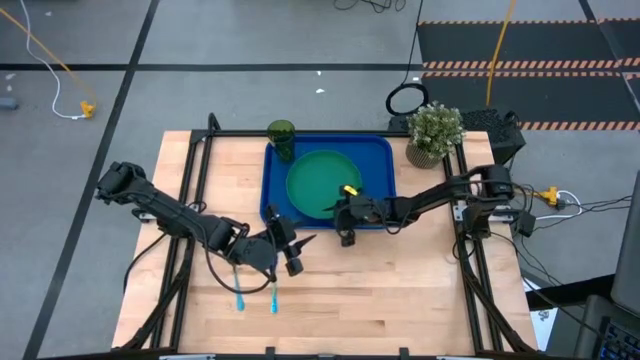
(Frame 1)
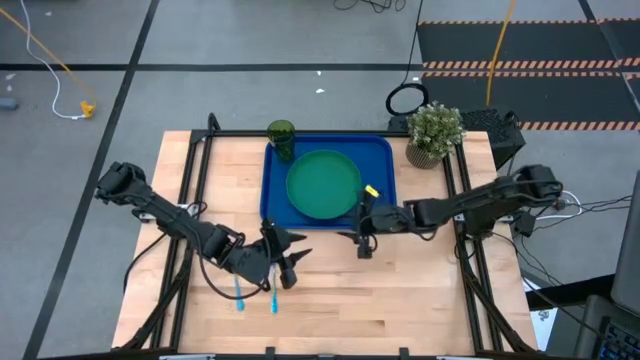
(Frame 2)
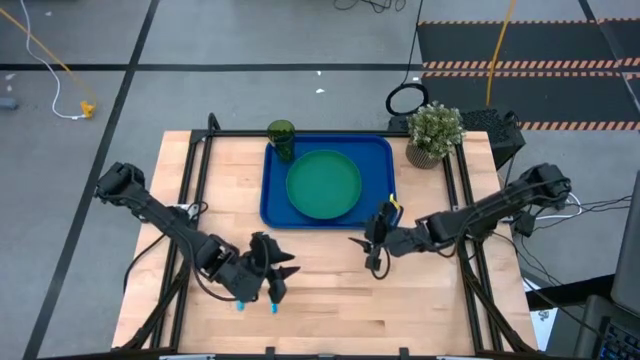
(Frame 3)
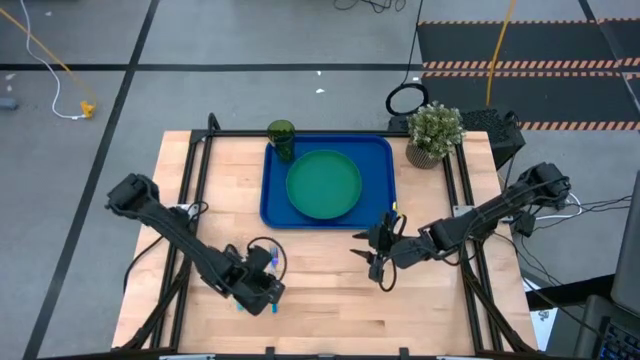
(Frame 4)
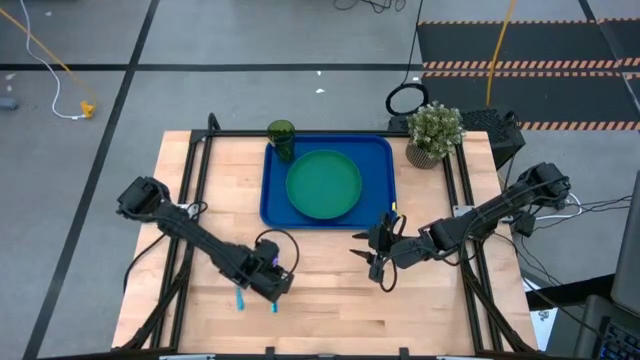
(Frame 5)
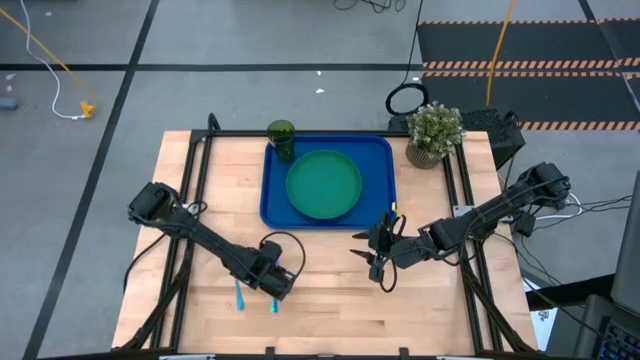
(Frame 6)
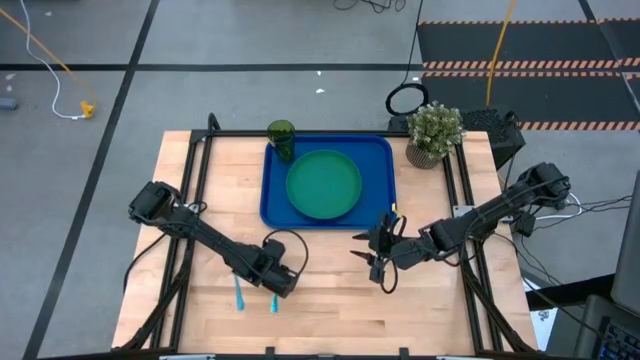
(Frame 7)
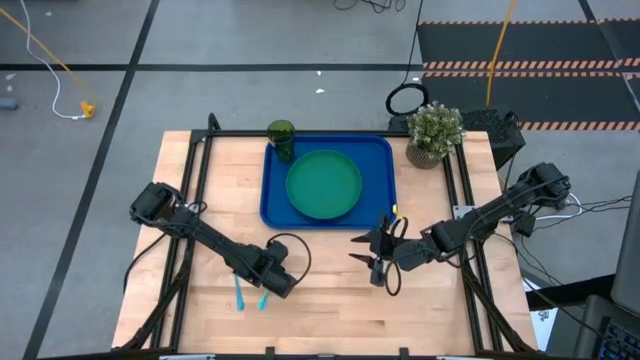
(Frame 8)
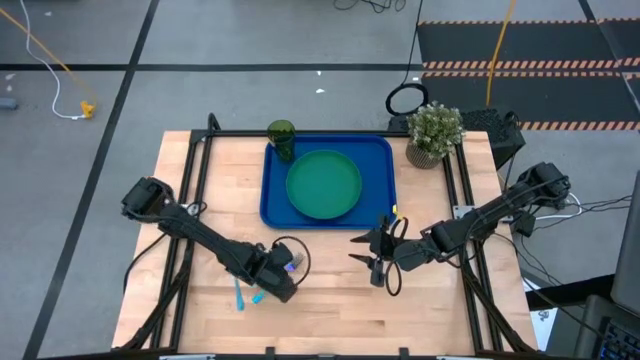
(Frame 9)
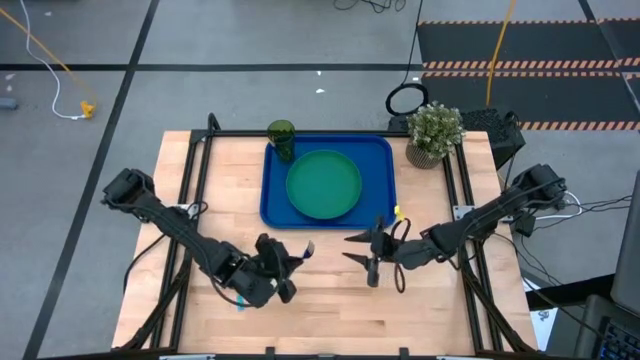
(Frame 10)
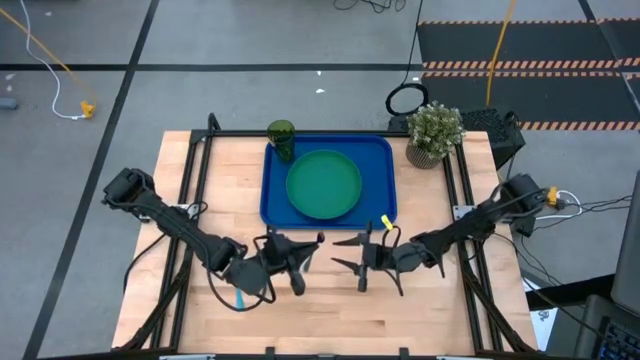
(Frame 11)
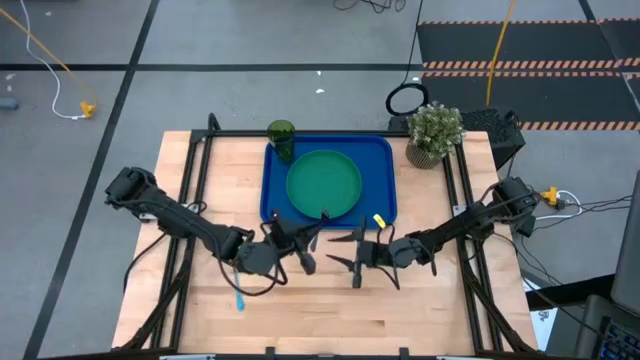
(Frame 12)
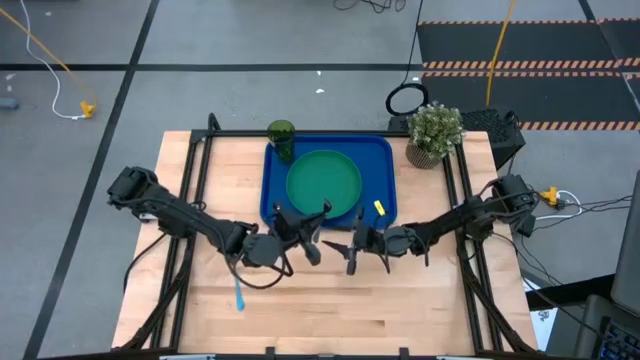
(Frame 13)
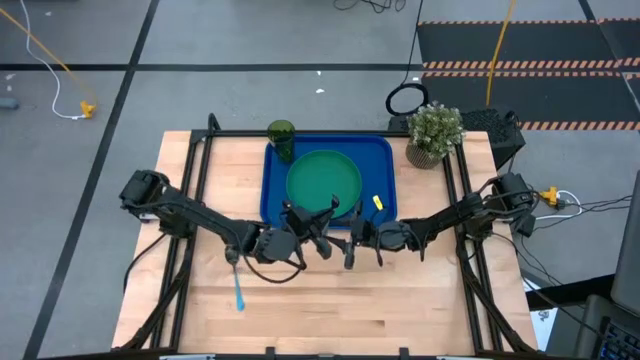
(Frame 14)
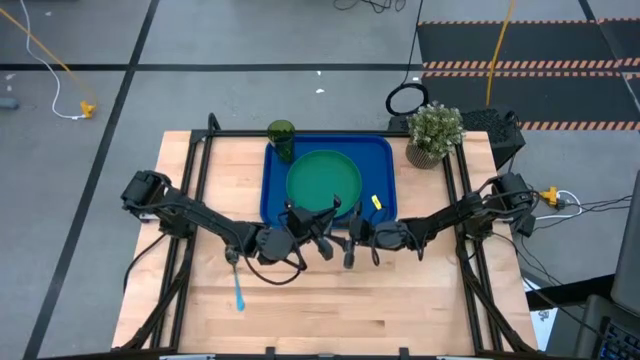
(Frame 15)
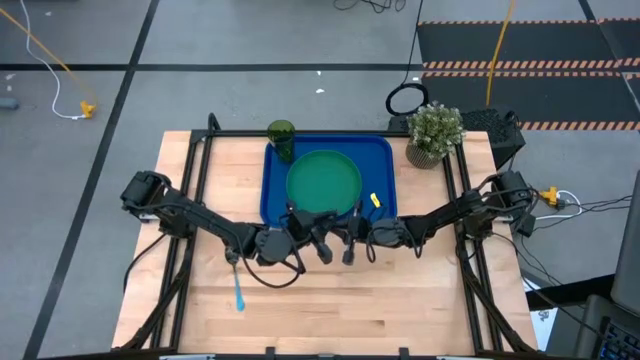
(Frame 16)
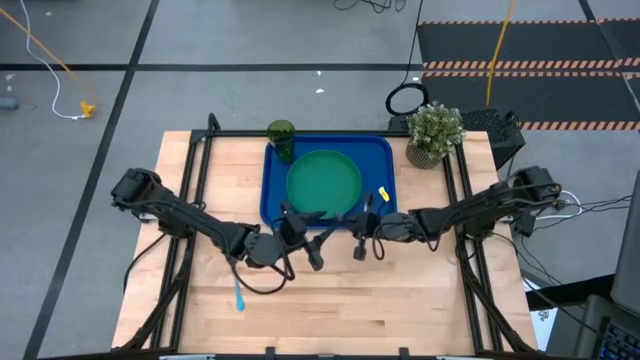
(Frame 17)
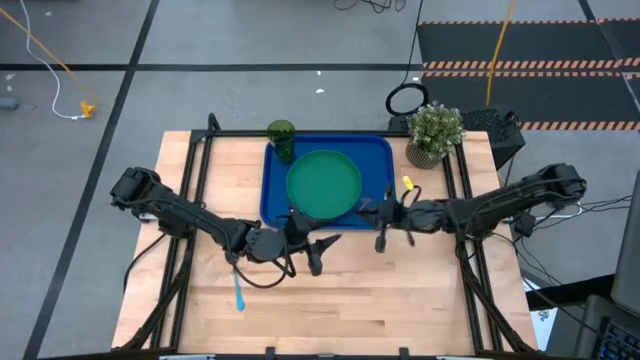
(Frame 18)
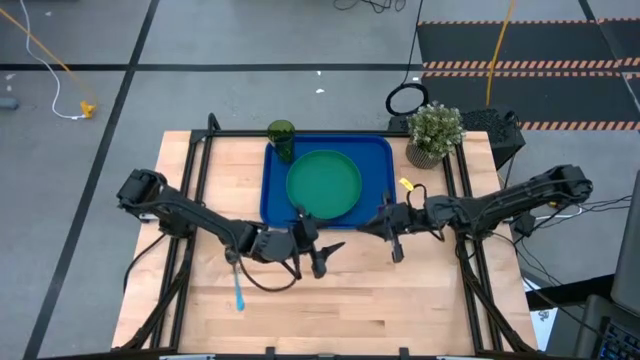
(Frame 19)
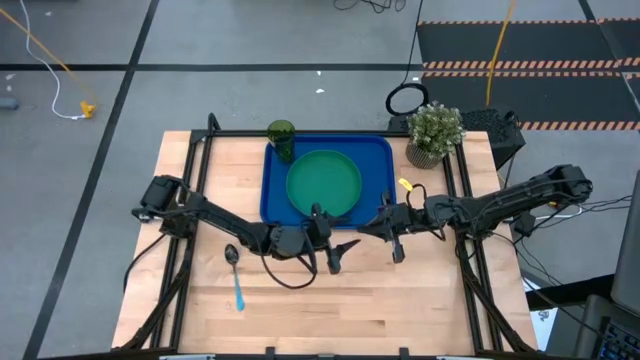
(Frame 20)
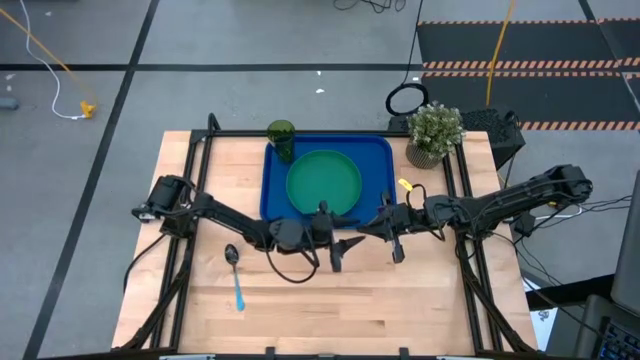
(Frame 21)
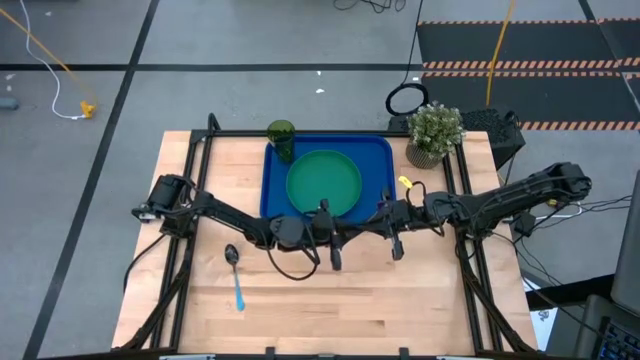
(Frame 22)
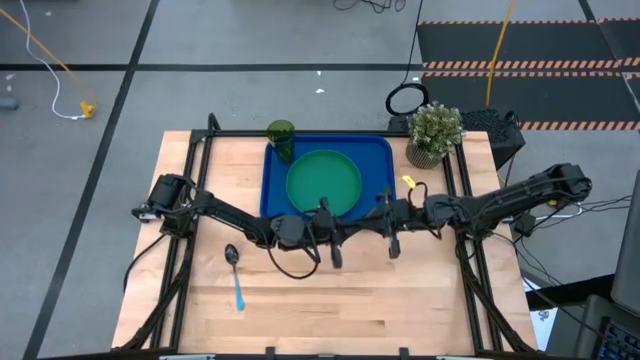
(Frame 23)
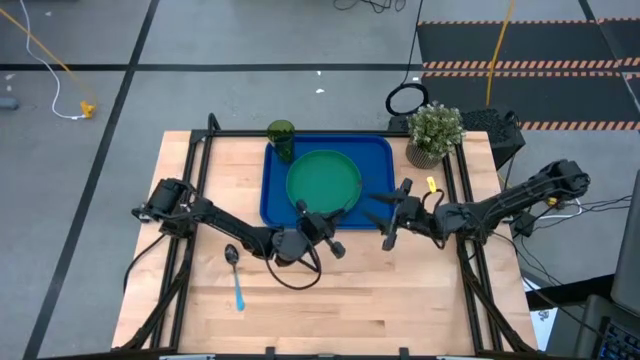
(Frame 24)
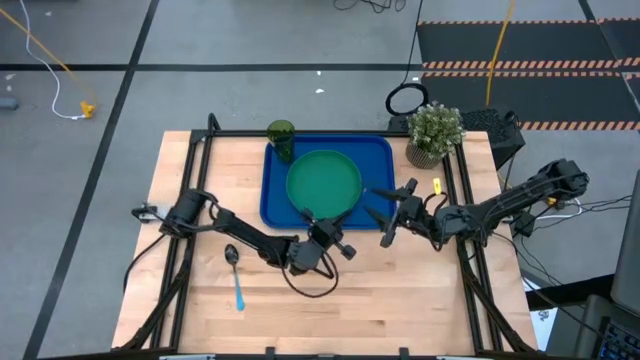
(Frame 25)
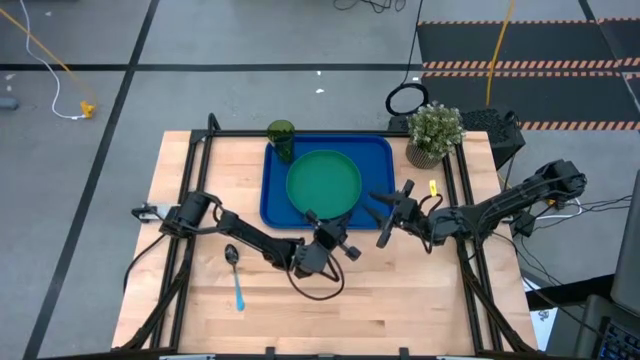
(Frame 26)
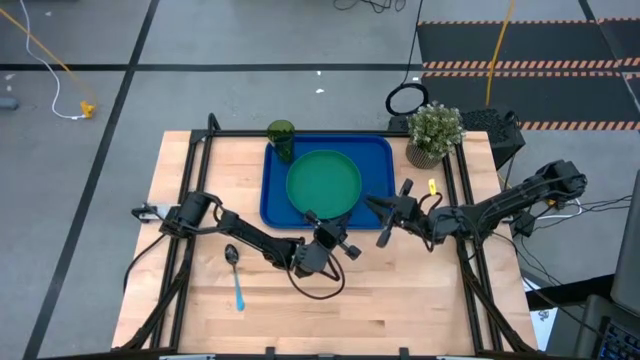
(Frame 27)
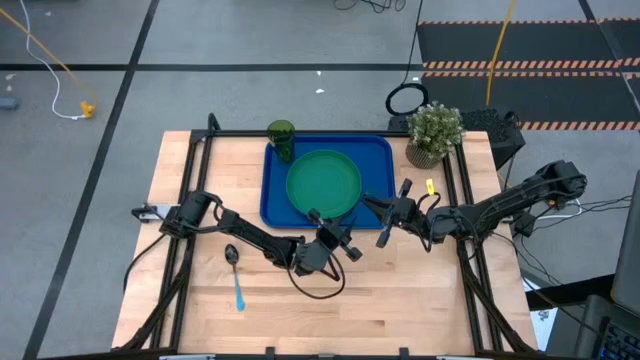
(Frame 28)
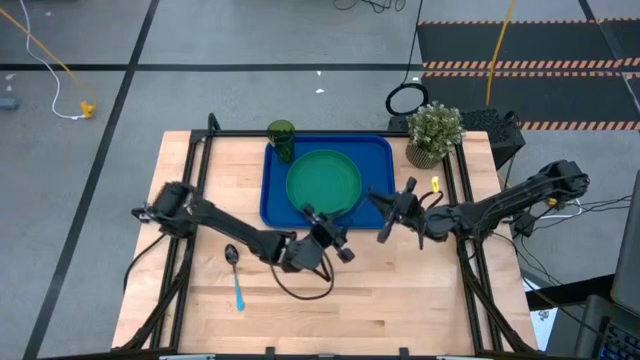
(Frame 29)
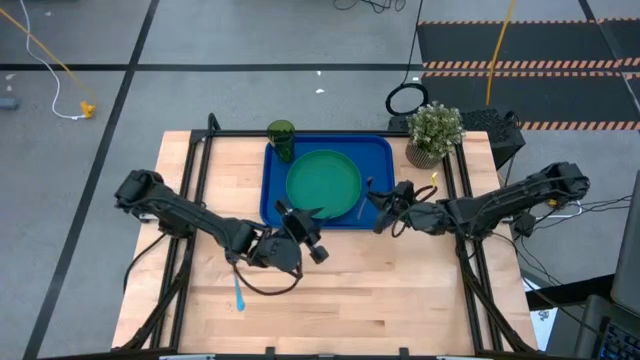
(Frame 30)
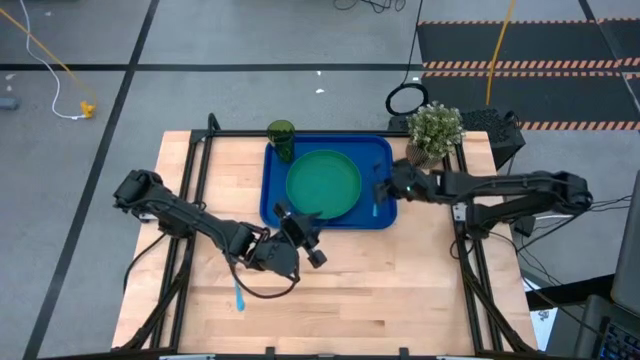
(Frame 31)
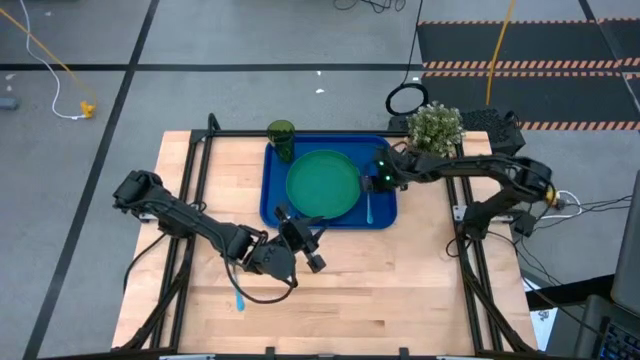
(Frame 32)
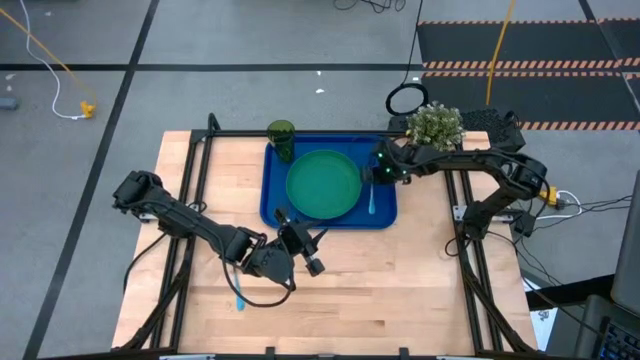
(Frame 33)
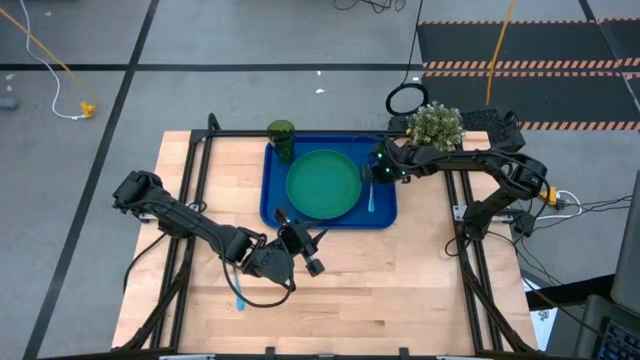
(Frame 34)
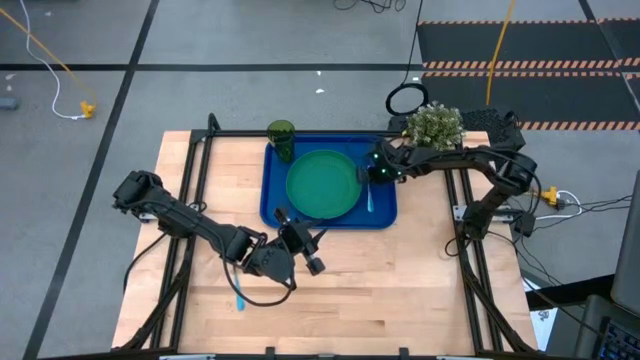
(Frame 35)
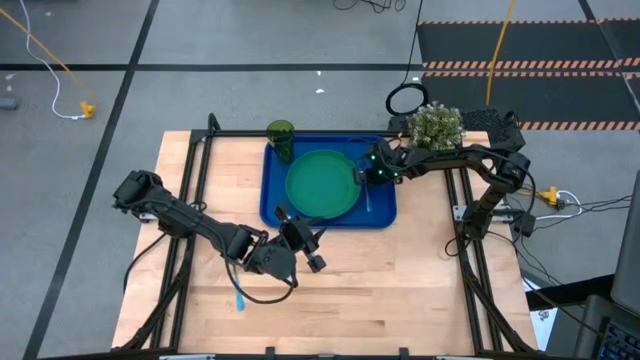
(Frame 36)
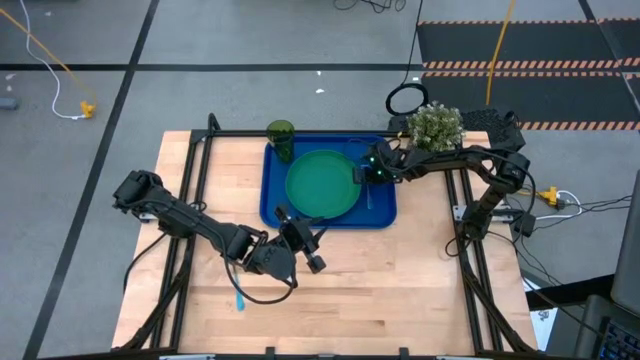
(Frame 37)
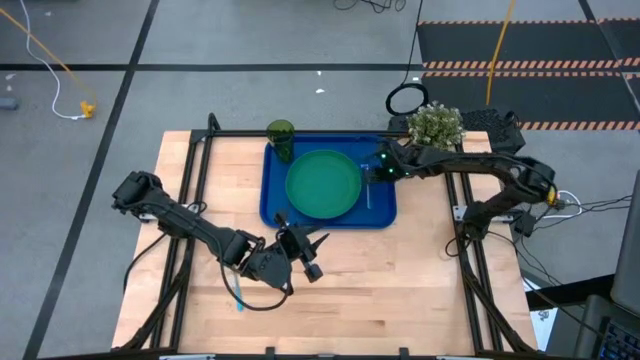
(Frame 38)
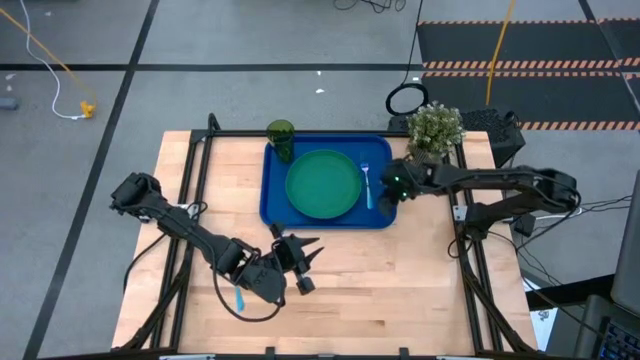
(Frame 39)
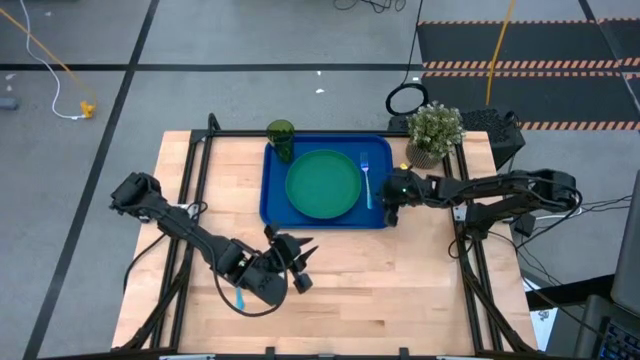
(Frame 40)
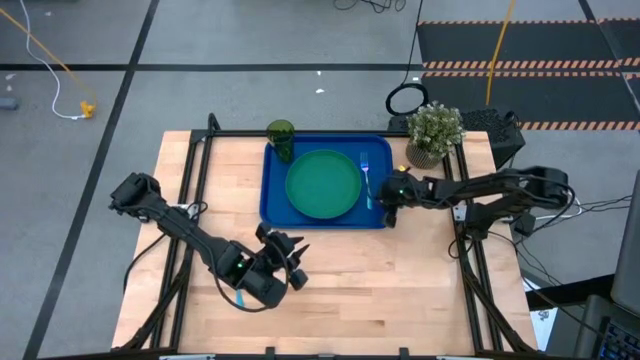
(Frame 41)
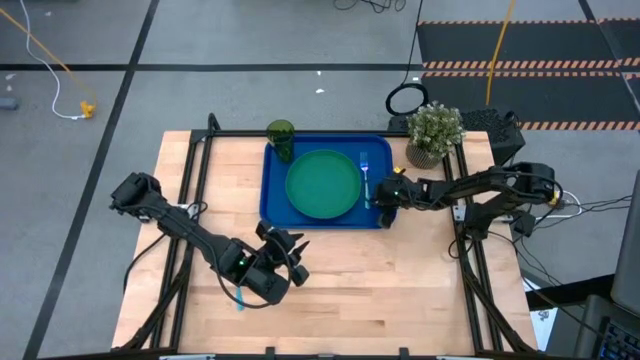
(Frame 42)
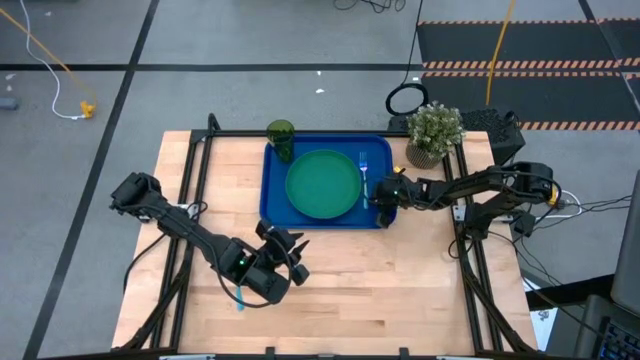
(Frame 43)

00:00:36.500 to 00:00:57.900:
Task: Pick and place plate/cup/fork/spoon on tray
Put the fork beside the green plate

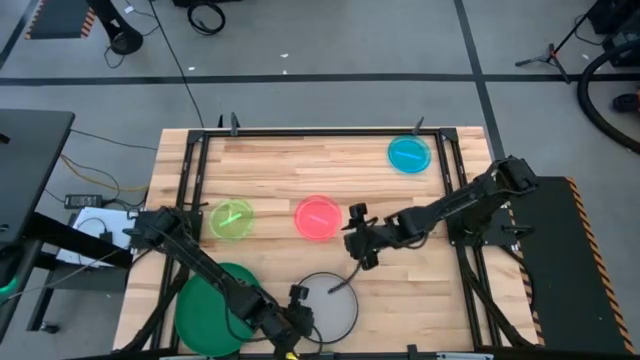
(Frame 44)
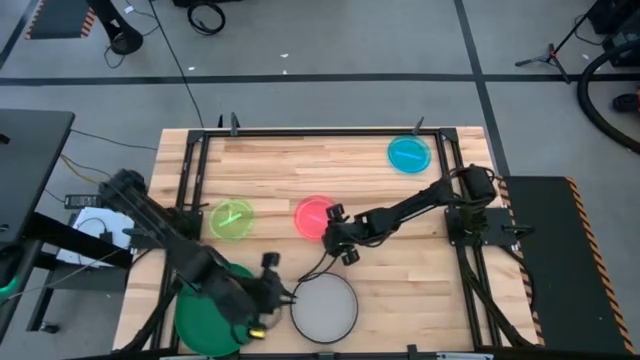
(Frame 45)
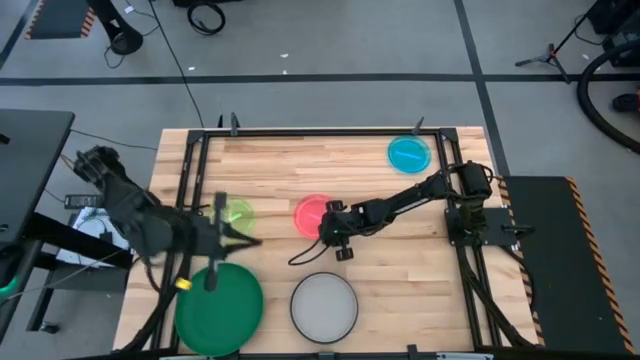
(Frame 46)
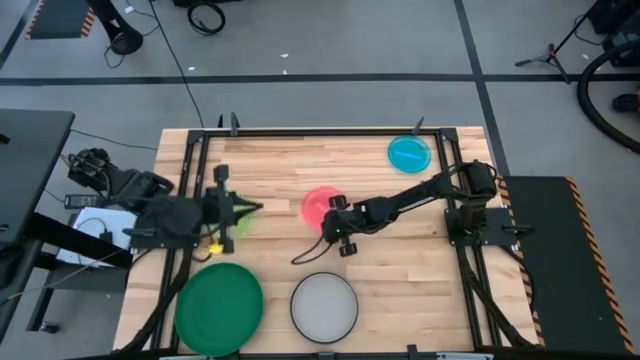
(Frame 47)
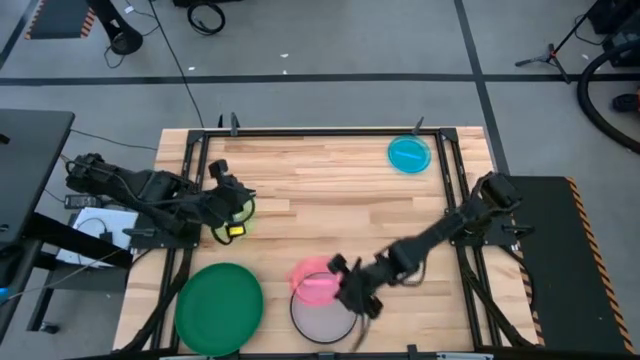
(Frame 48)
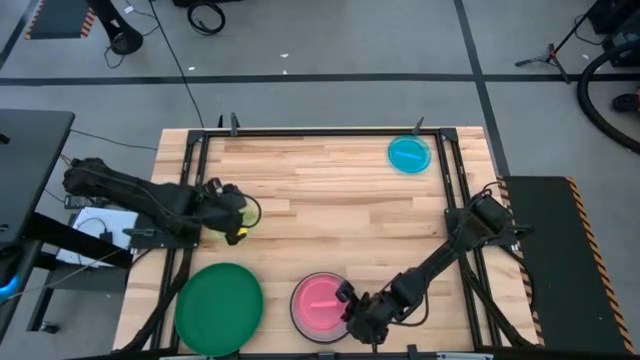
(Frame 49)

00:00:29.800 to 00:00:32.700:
Task: Stack plastic plates
Stack the pink plate on top of the gray plate
